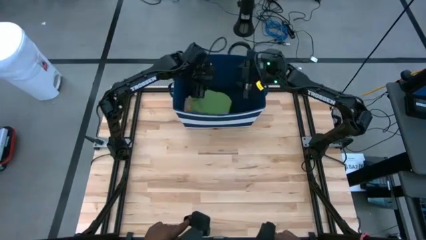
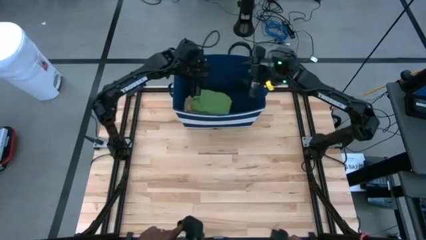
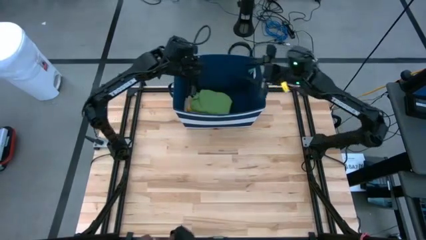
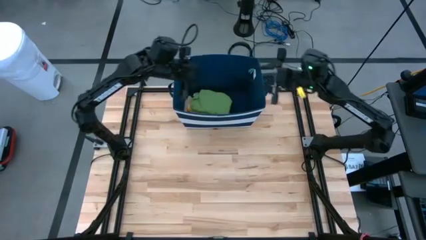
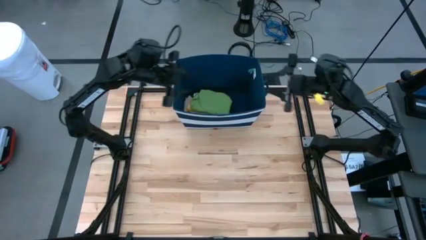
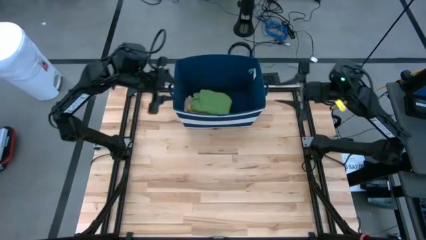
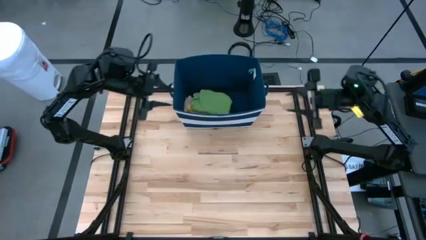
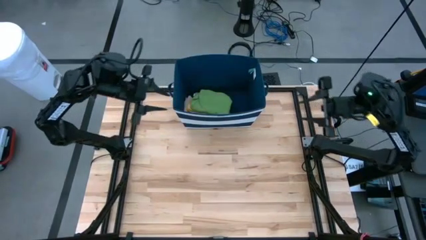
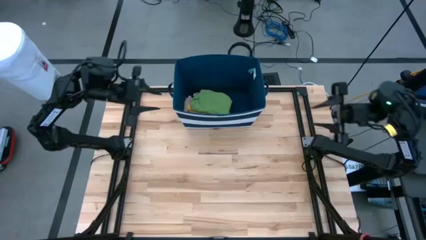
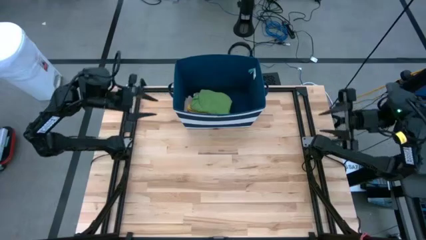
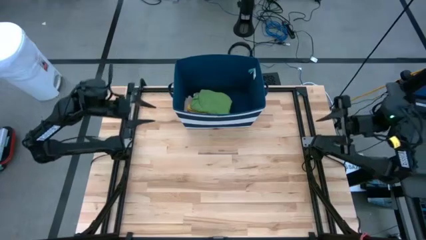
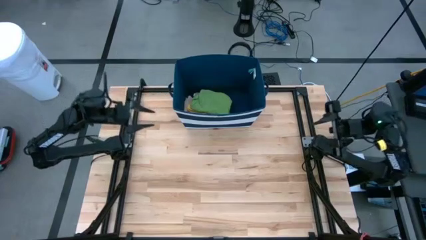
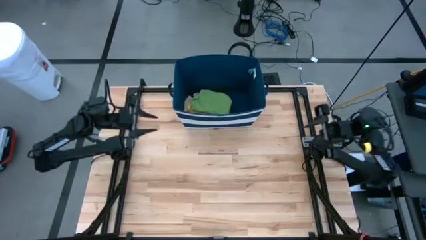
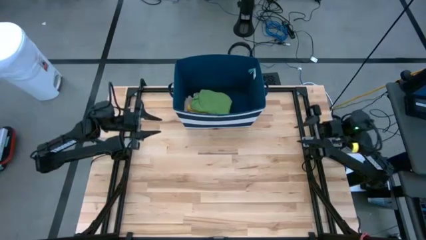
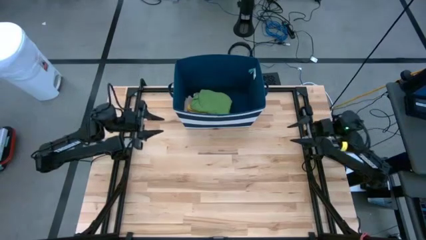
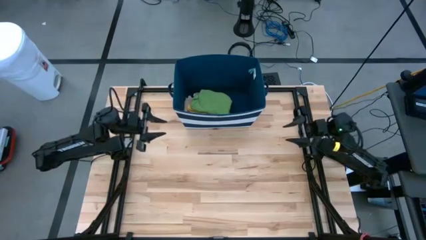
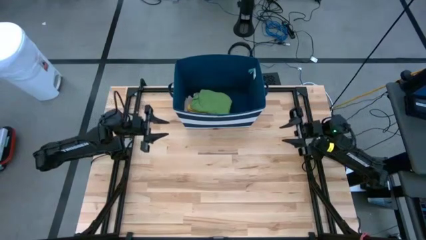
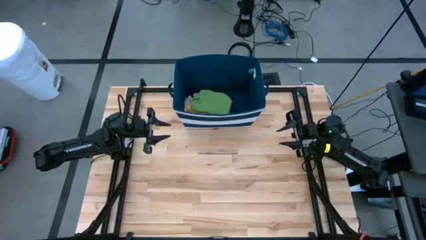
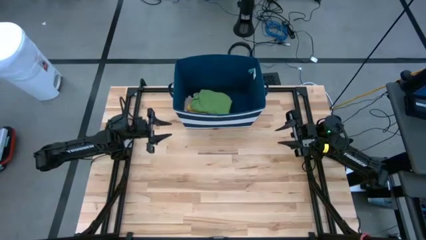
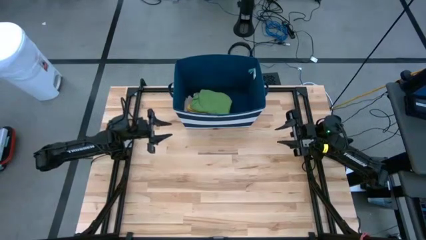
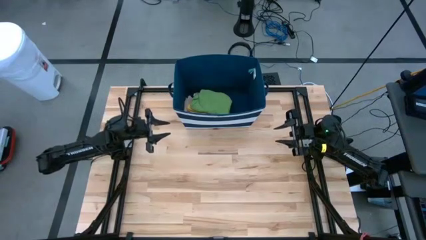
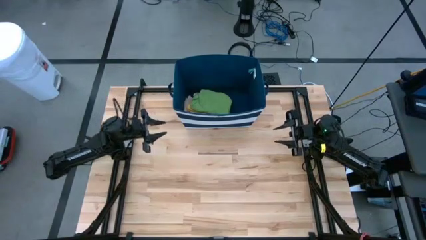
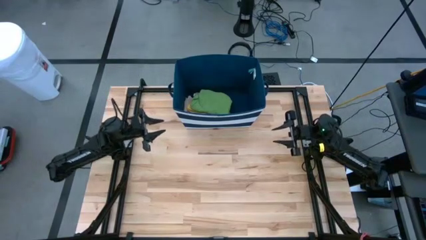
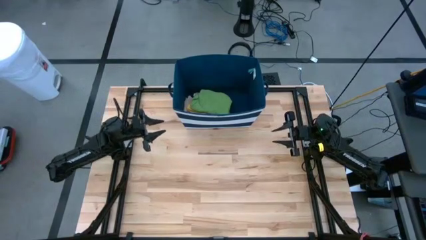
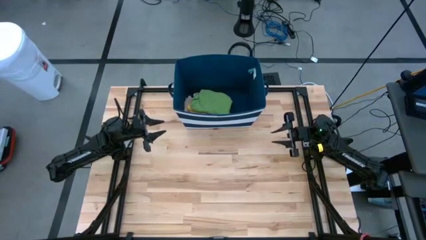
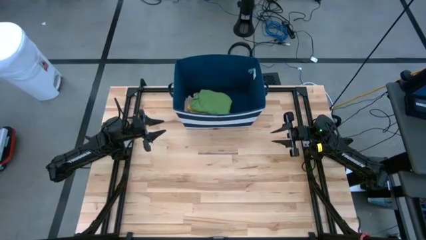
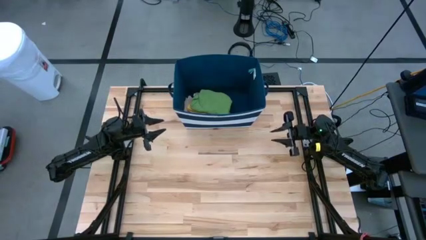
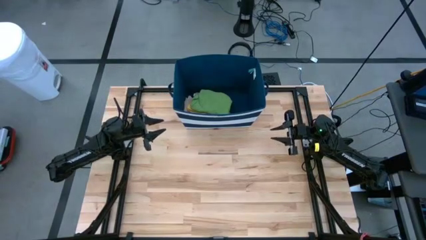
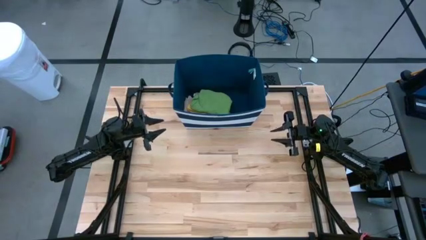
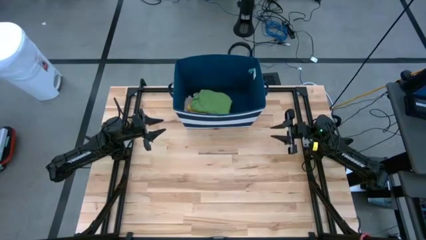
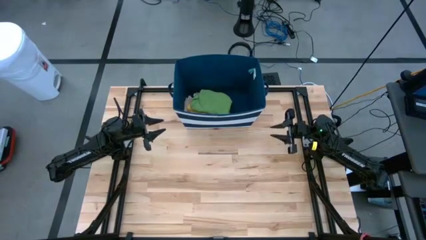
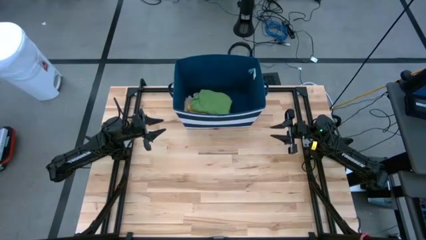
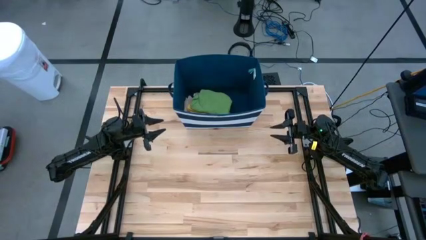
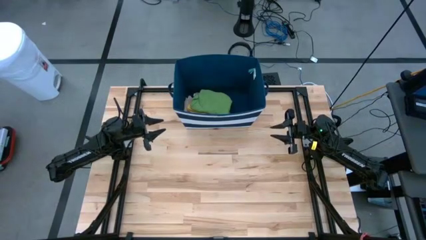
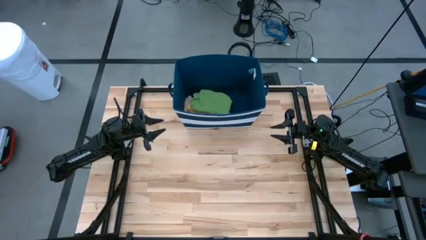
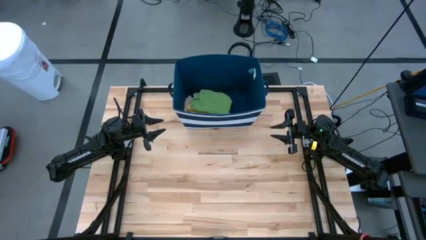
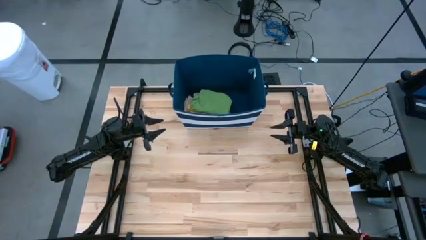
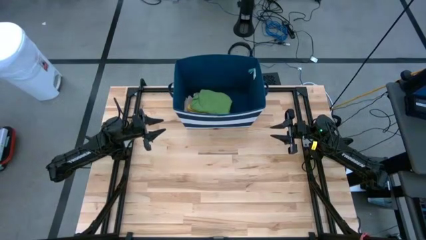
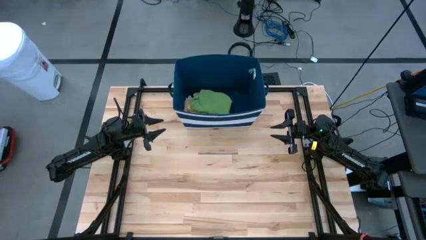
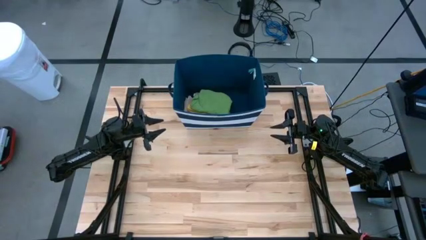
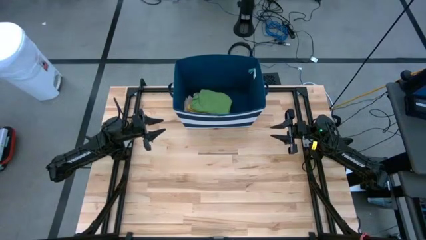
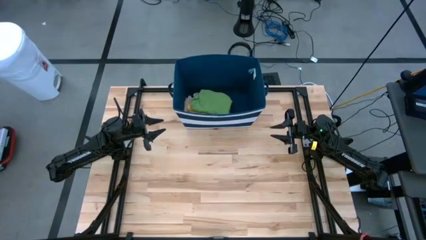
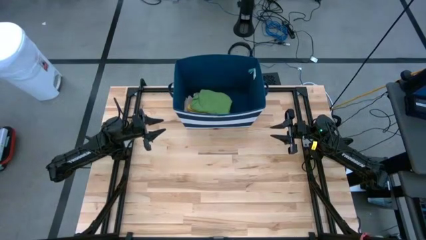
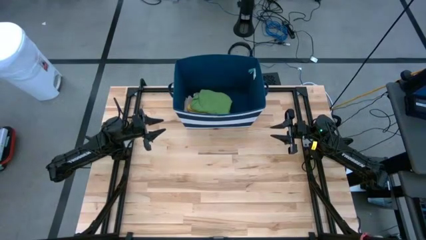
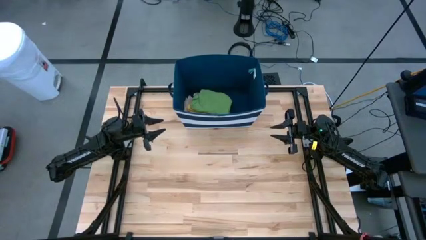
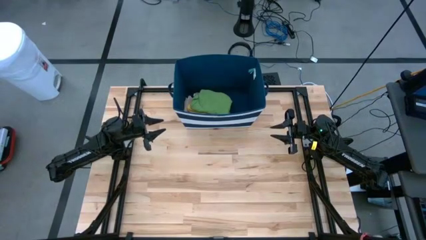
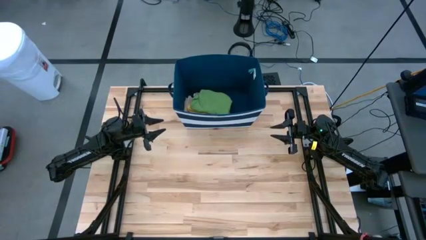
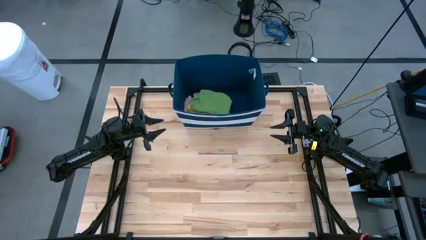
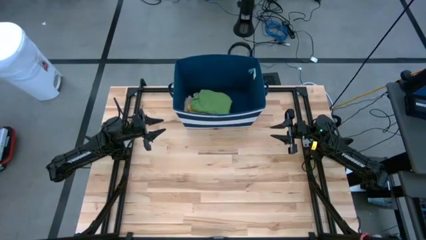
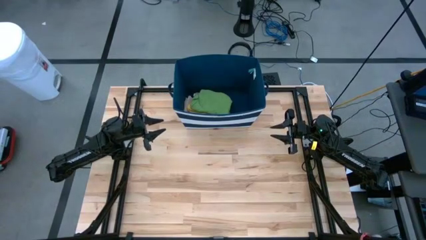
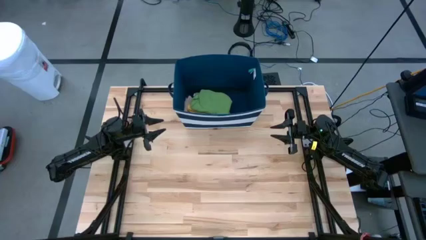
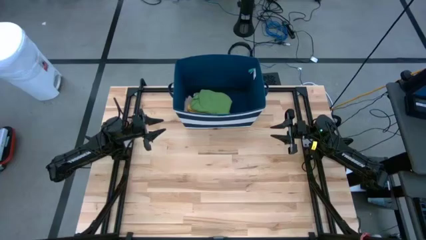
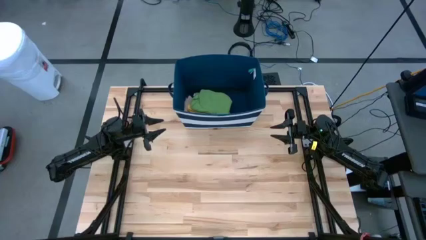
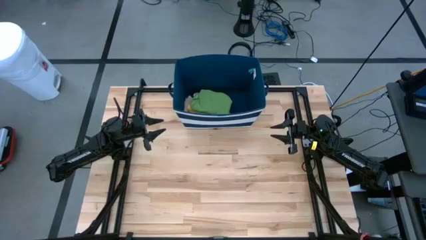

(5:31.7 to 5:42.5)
Task: Fold towel
Return to Home Position

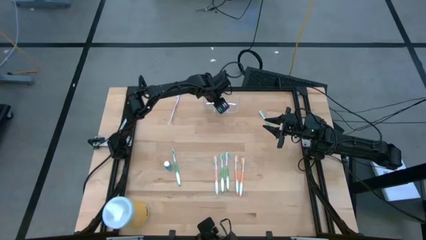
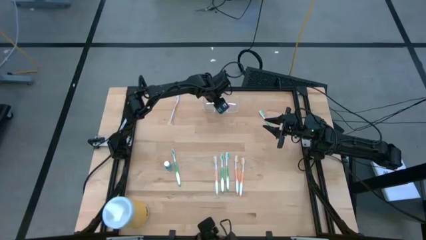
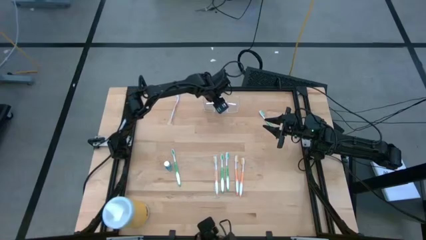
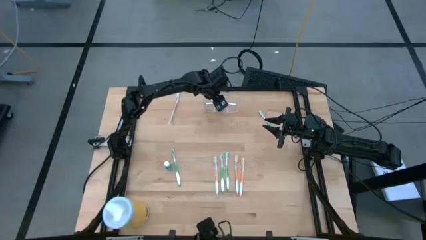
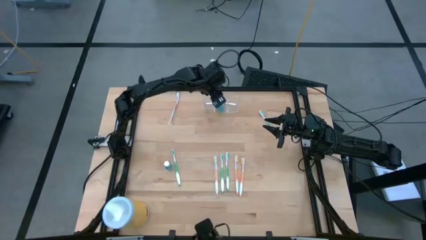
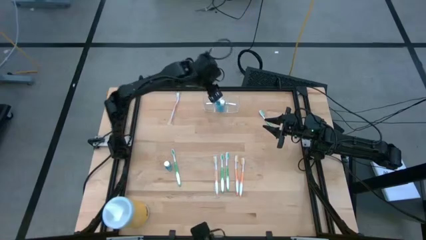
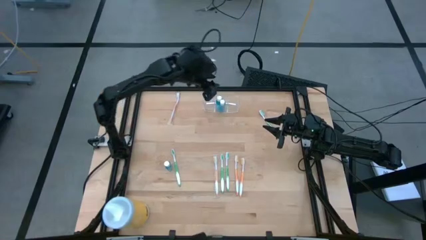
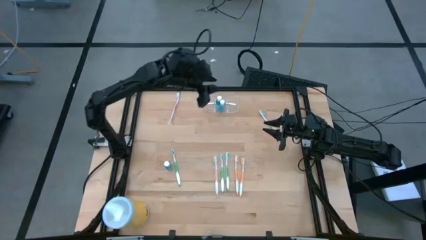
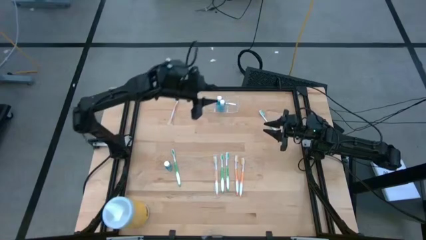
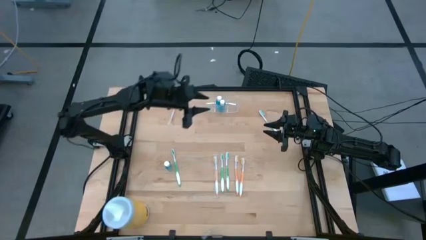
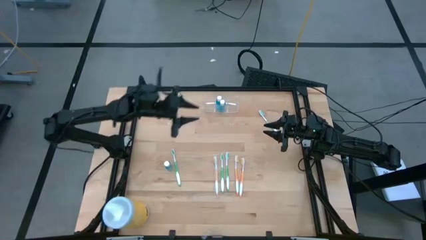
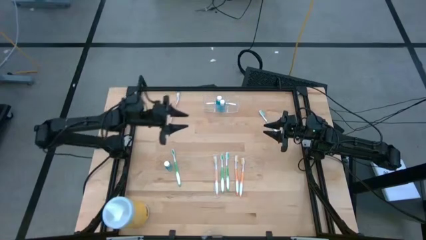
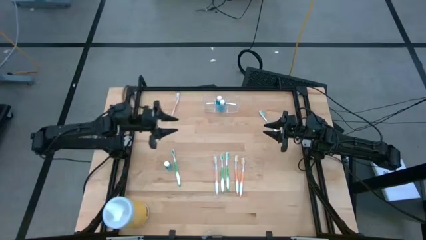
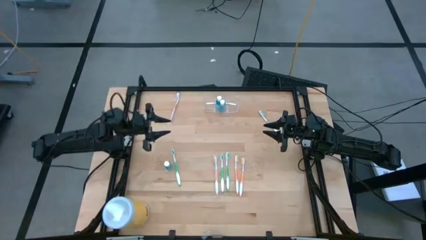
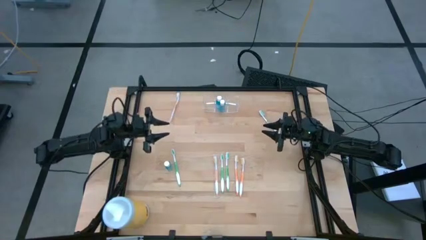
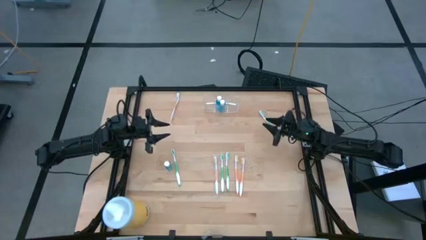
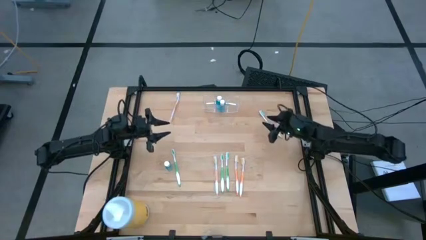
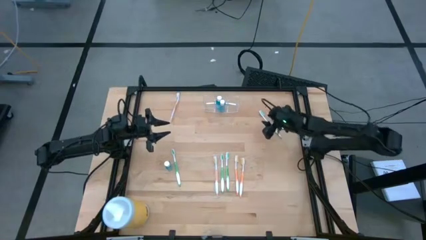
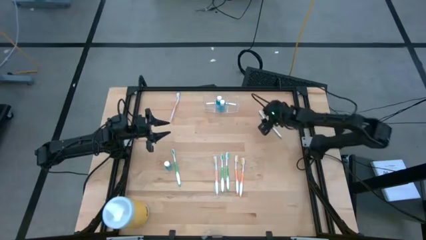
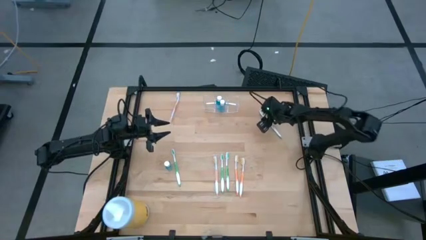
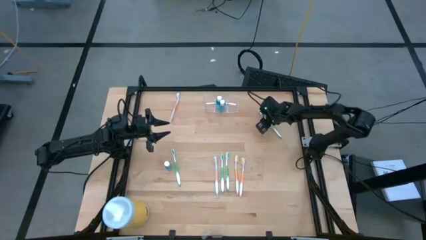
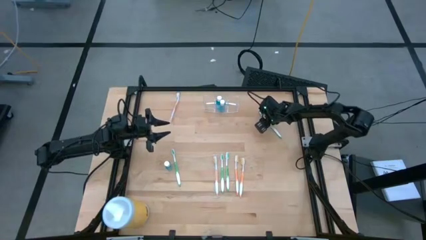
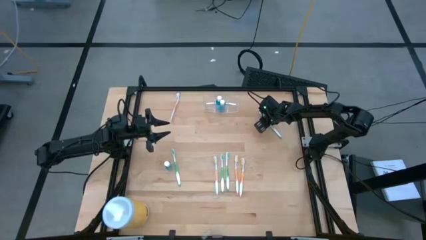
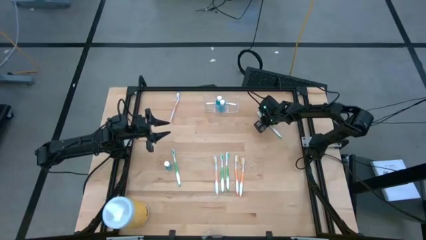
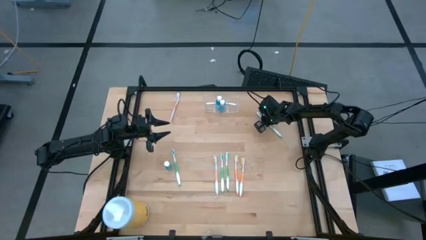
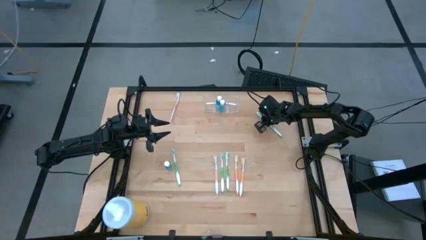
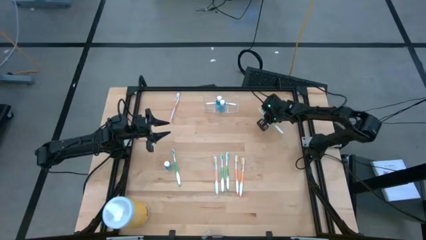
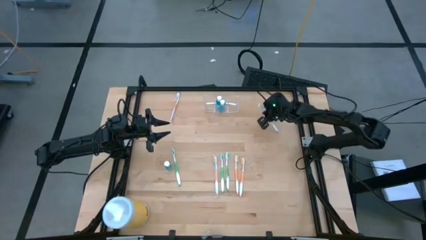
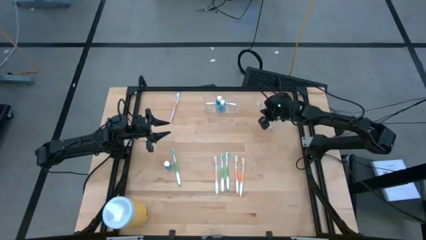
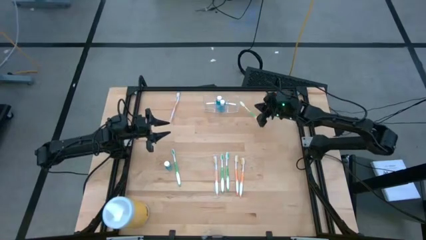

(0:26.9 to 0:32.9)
Task: Pick & Place toothbrushing station
Put the green toothbrush into the transparent organizer
